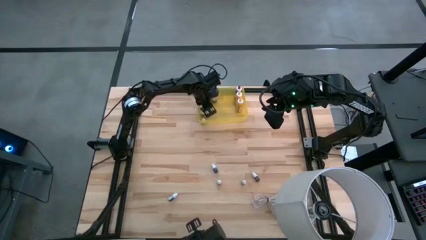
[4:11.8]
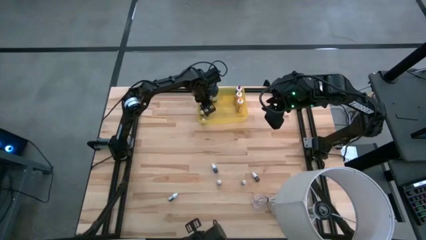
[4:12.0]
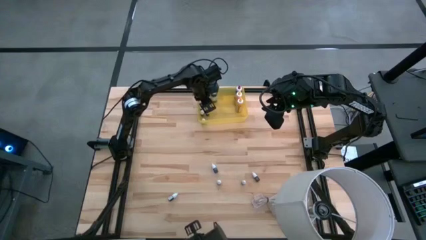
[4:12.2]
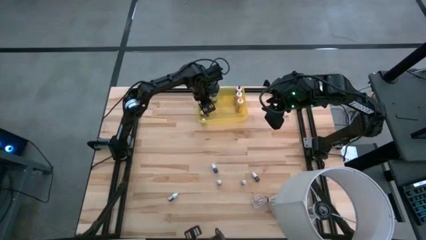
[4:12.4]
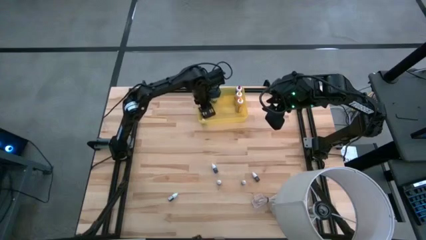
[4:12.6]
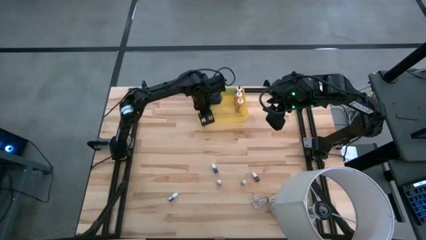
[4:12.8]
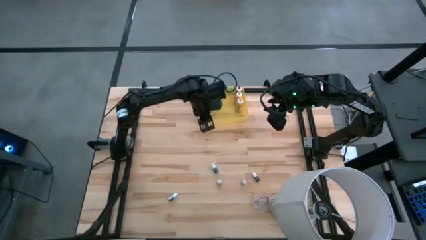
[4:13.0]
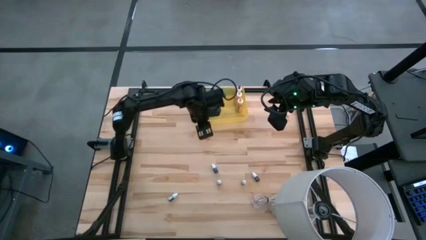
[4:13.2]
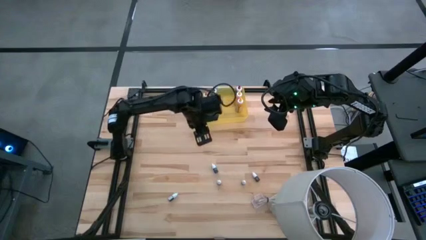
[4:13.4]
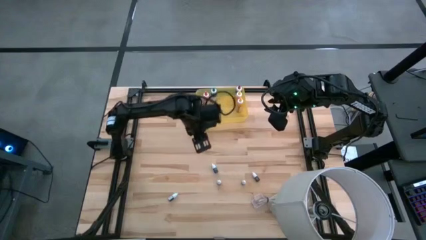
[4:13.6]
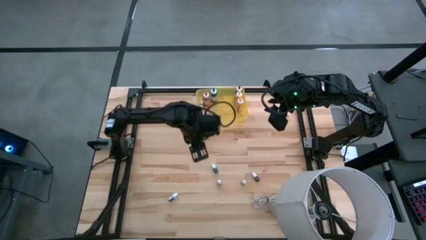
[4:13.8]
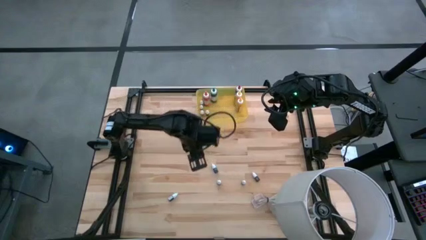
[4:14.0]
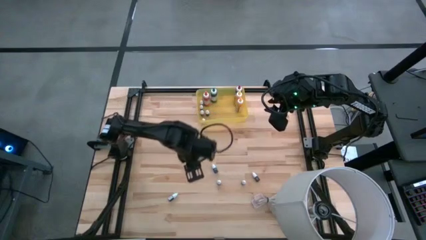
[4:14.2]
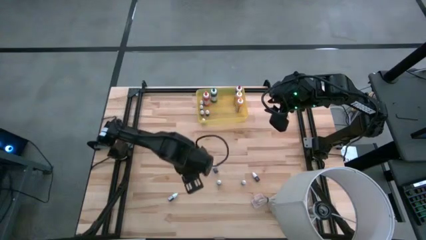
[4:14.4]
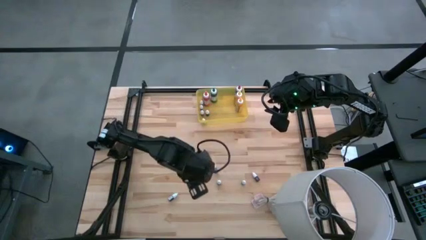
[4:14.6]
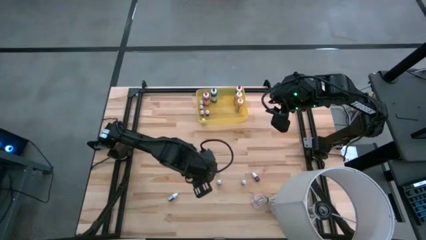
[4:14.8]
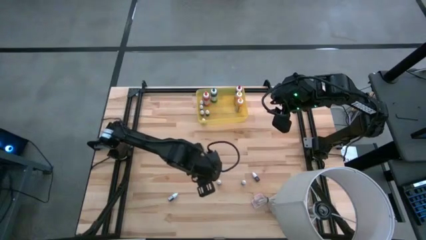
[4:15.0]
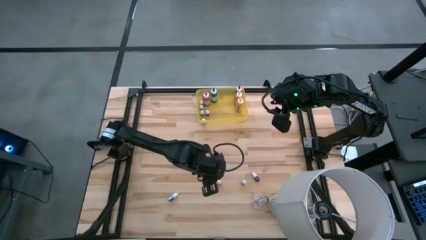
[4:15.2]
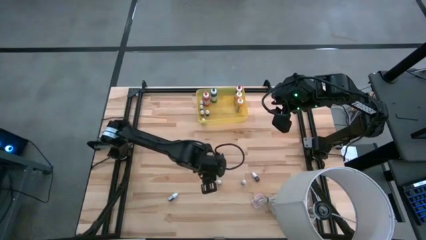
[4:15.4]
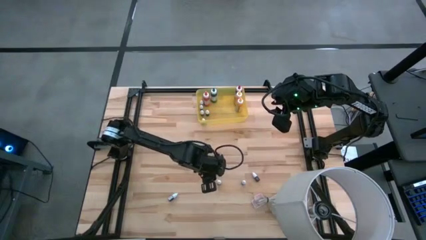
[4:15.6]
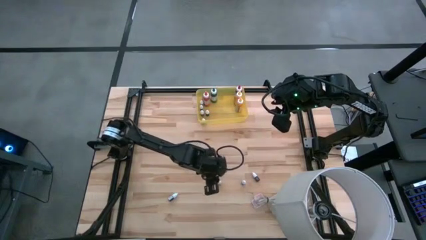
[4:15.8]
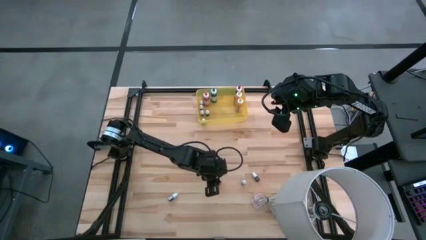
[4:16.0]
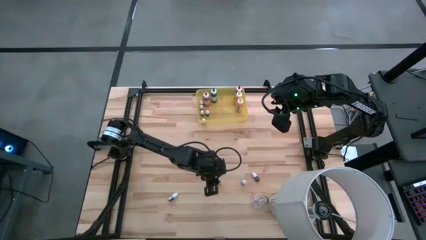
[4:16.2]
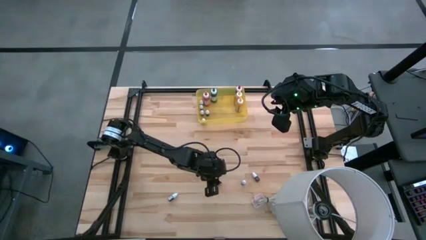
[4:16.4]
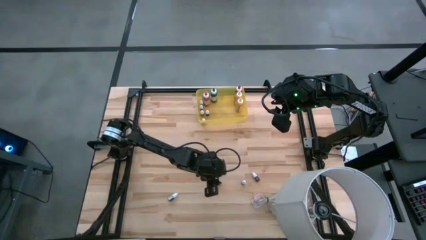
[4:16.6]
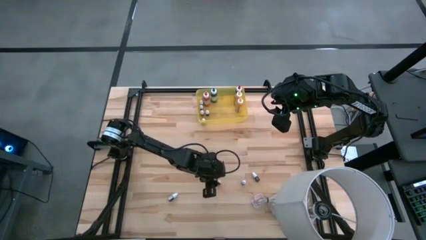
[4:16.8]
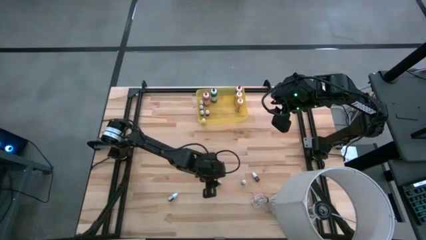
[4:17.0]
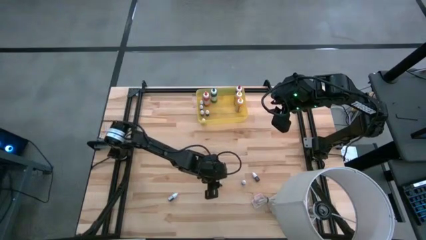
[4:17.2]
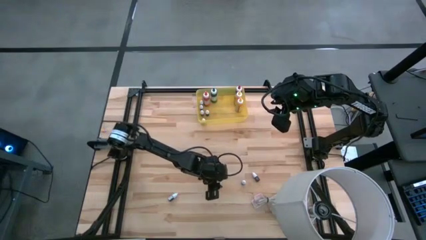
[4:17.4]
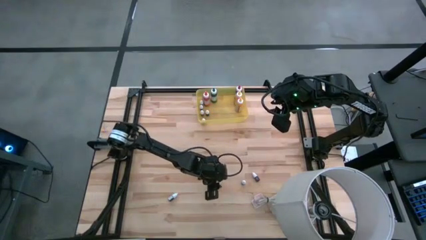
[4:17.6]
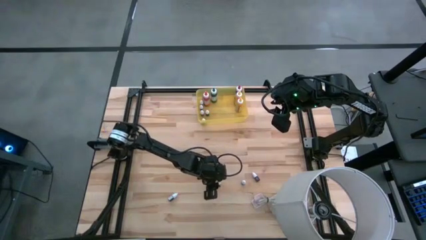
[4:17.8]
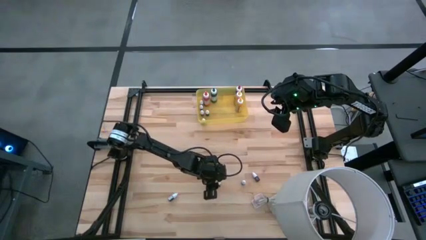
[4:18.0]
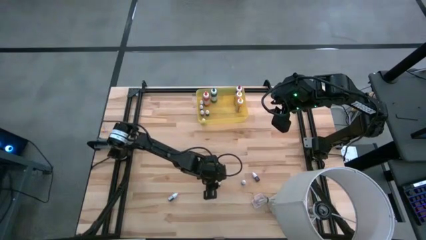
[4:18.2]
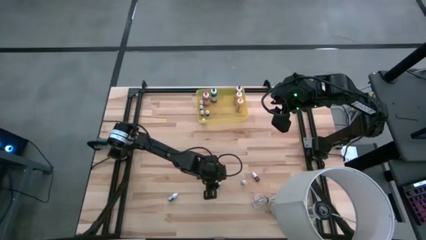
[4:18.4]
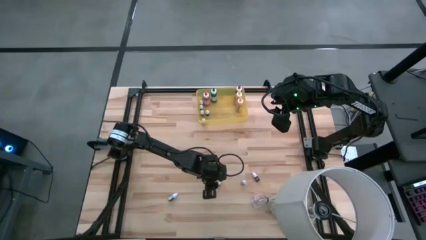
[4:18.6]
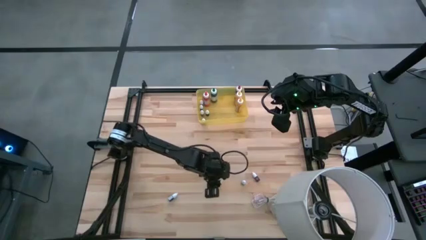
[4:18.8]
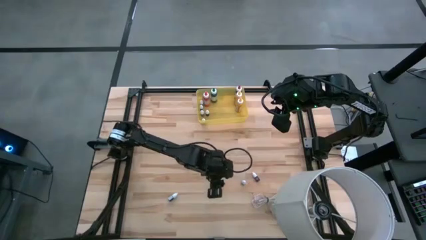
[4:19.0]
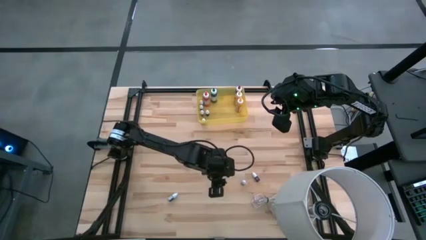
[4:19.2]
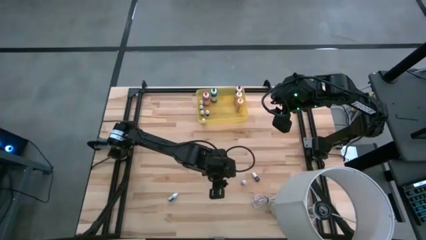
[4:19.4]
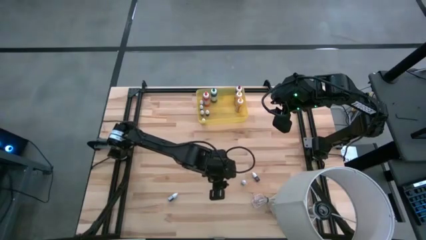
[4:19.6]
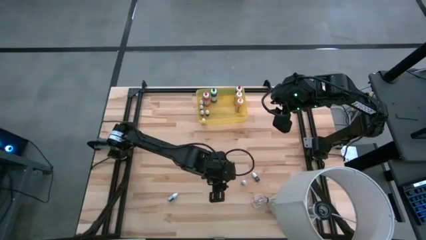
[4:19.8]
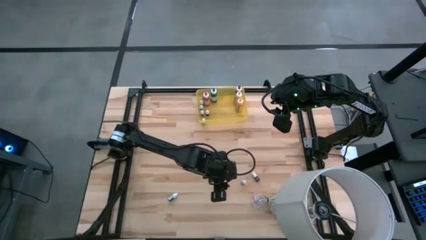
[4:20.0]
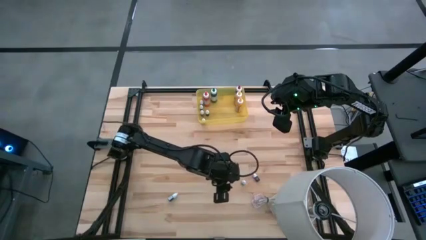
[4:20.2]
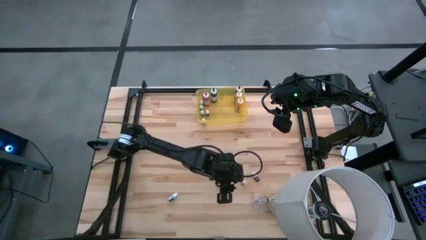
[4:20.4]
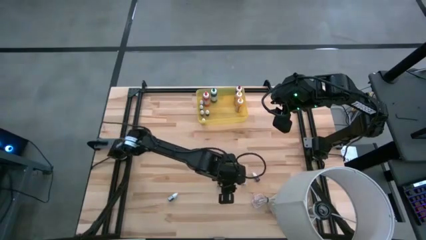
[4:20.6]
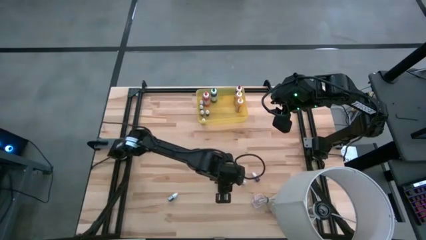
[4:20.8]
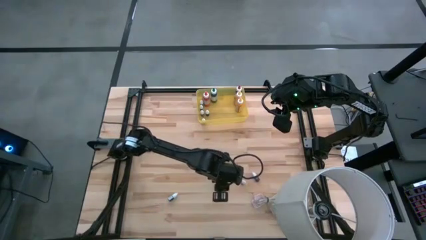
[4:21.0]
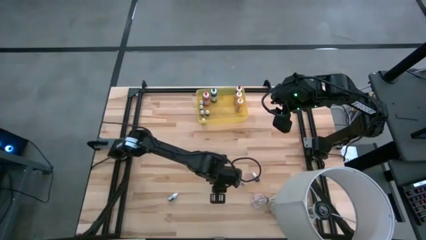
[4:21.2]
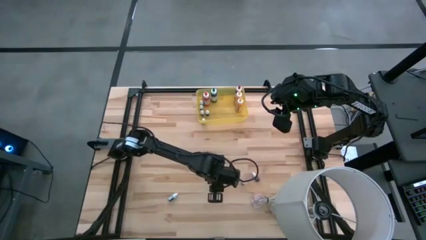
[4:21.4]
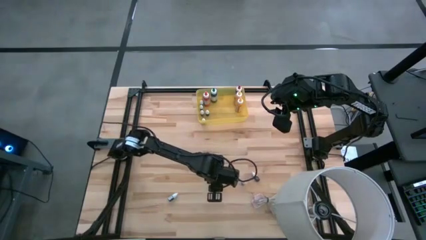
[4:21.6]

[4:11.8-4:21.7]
Task: Pick & Place food coloring
Put the small red food coloring bottle into the yellow bin
